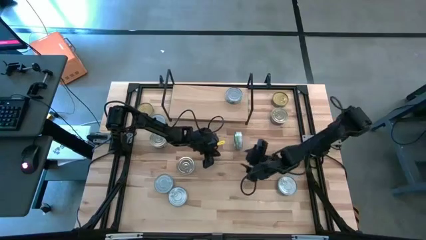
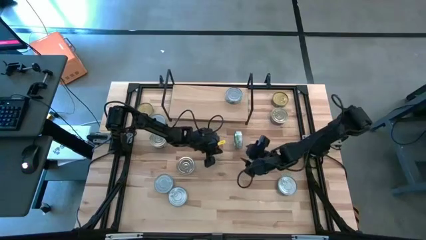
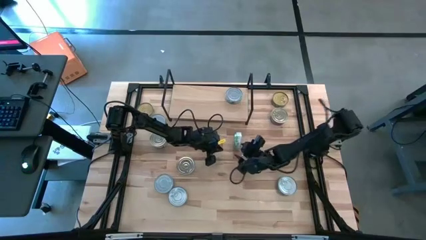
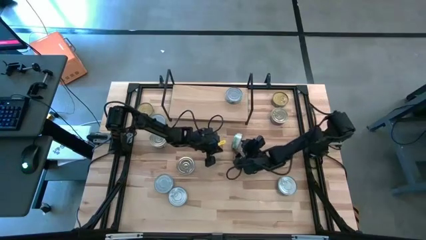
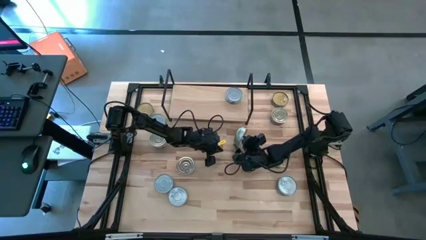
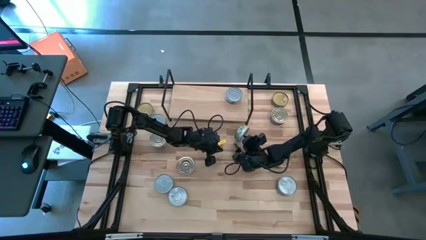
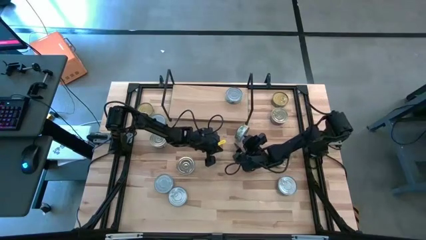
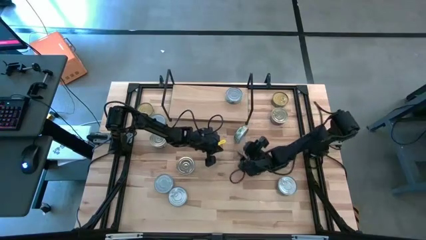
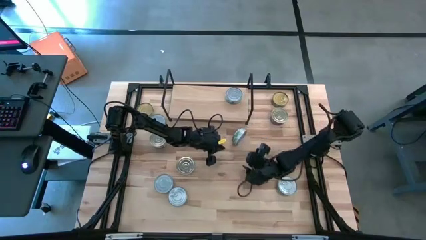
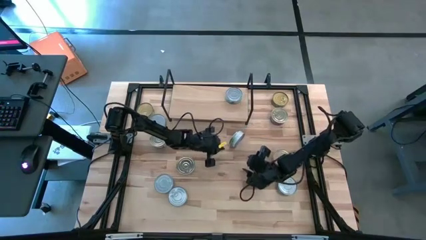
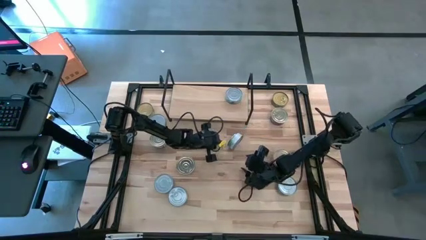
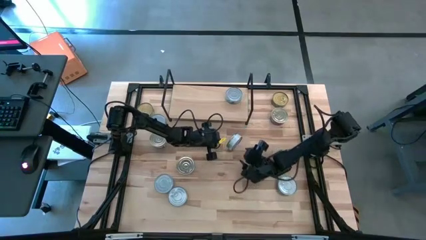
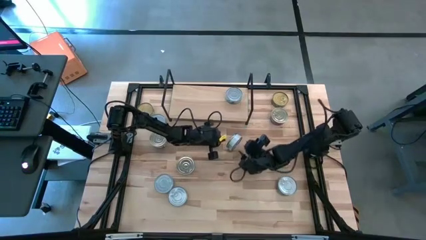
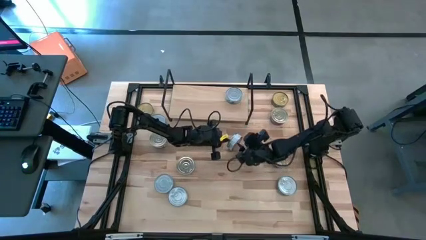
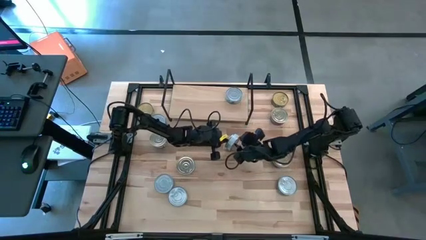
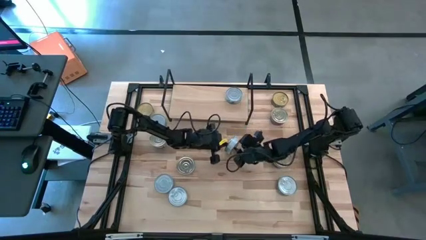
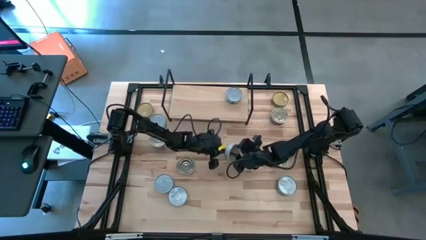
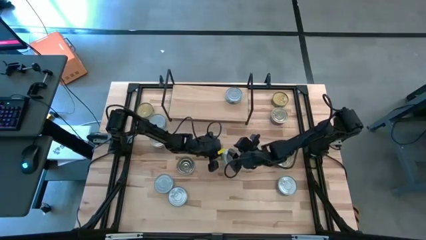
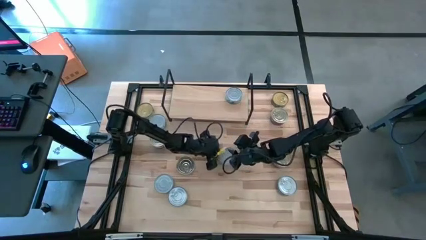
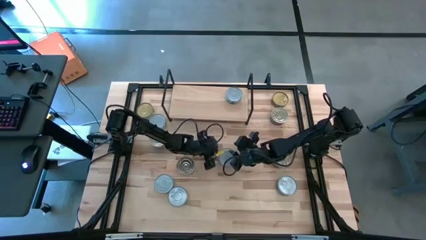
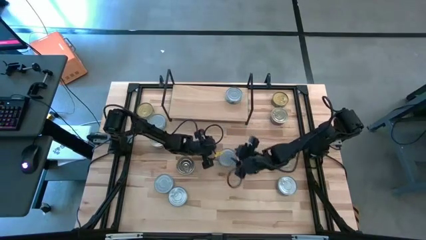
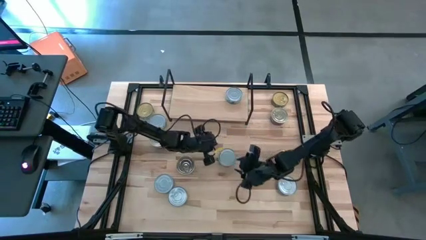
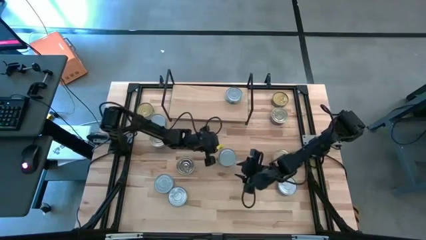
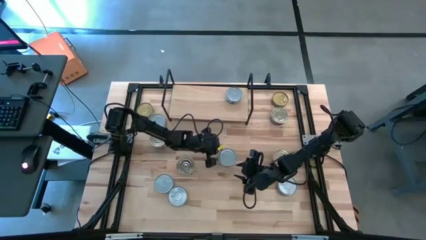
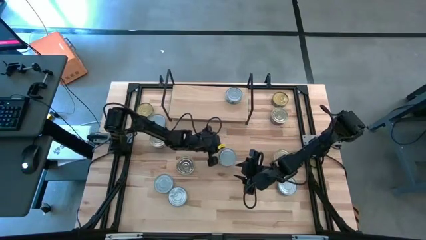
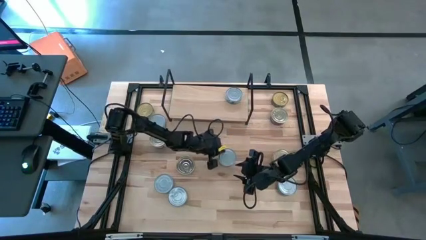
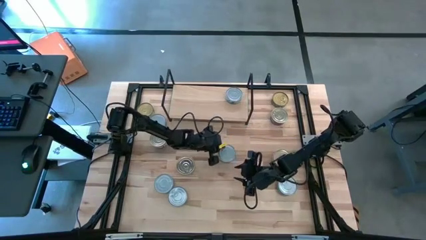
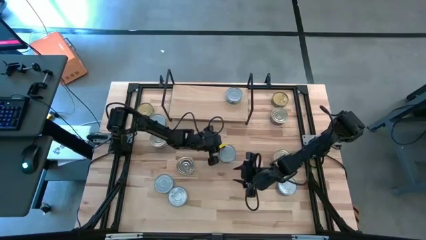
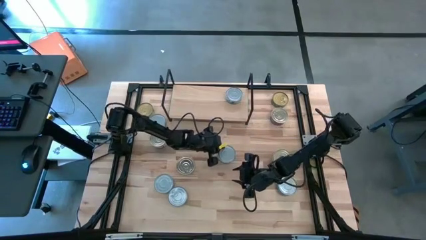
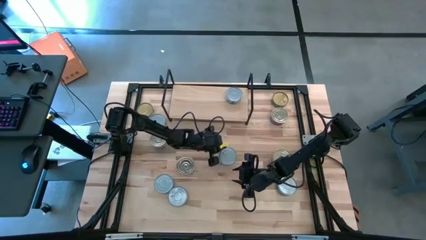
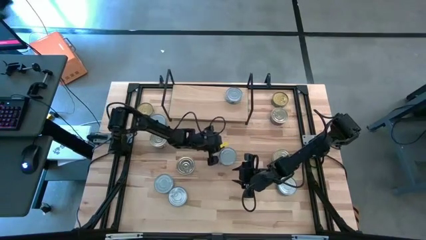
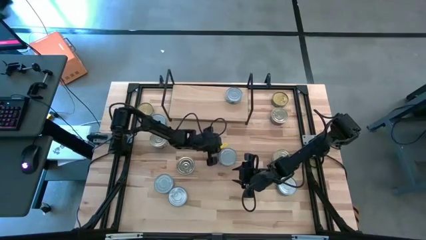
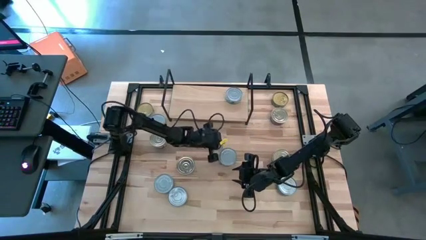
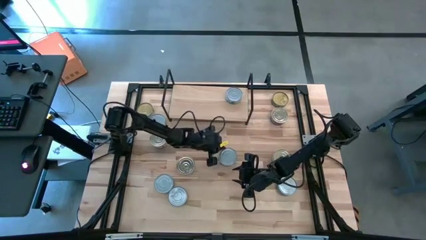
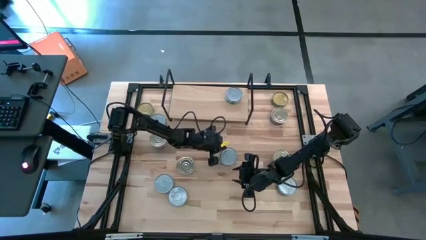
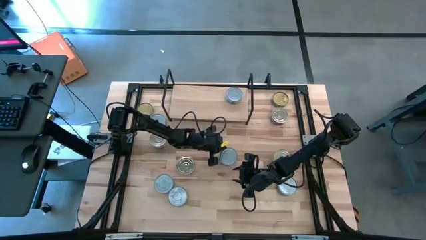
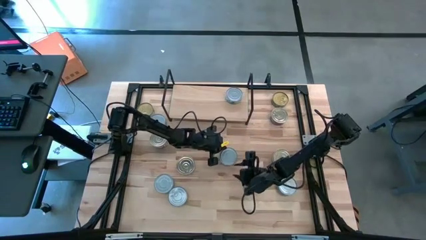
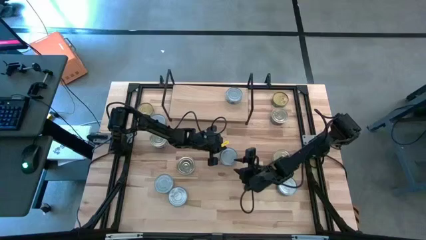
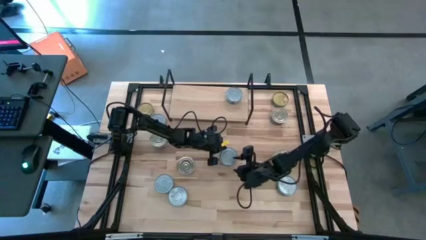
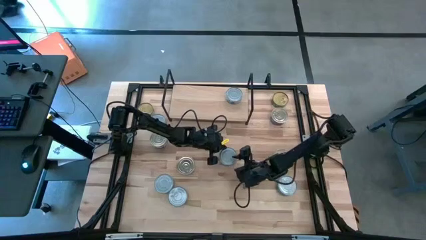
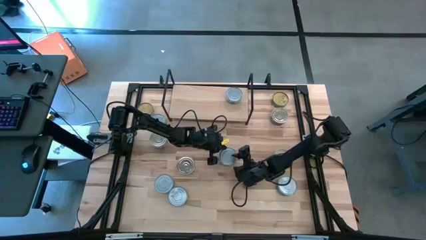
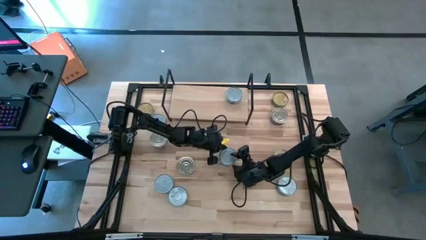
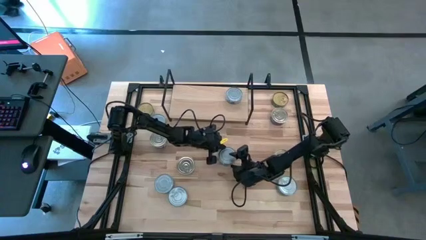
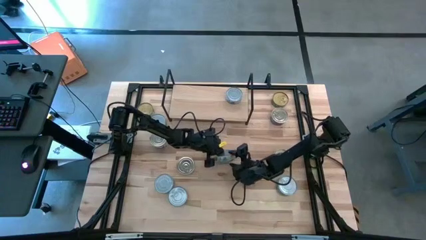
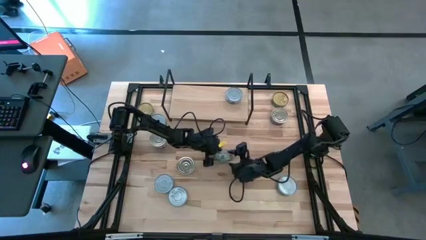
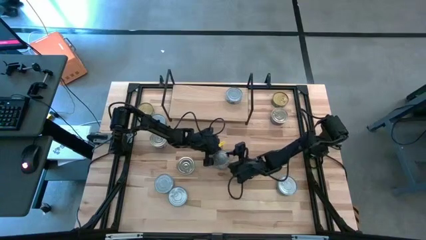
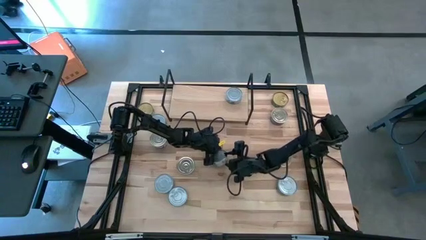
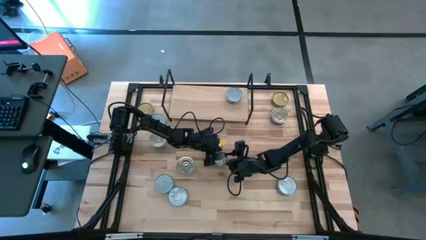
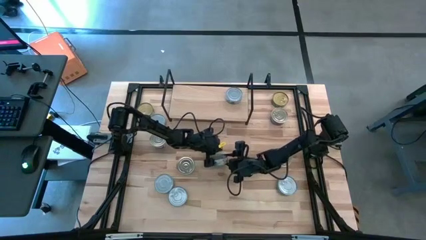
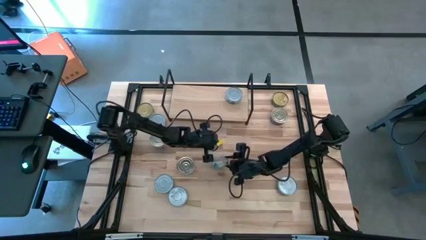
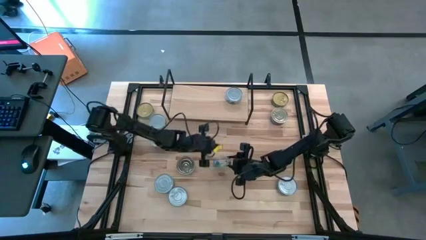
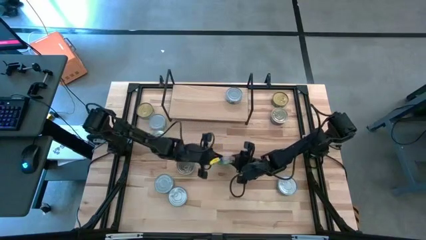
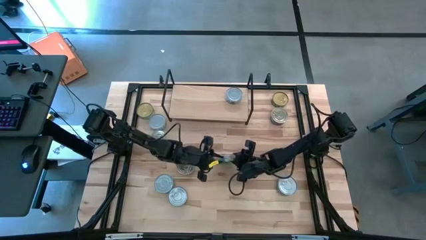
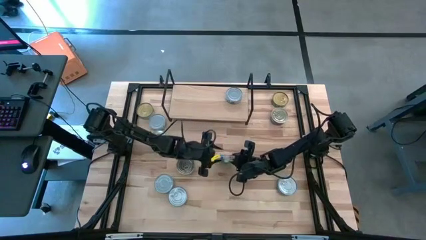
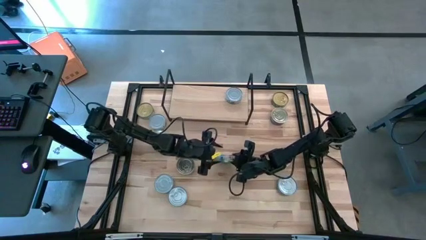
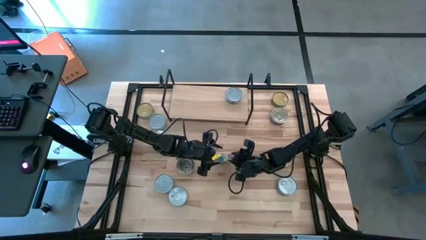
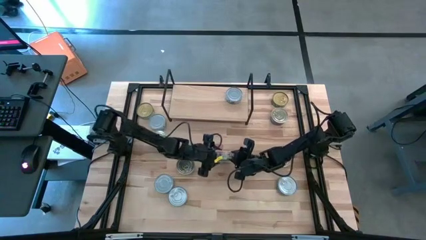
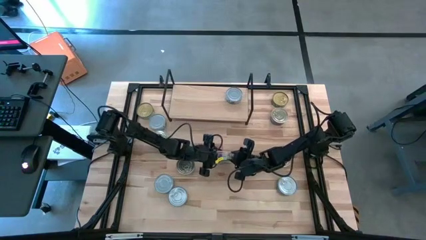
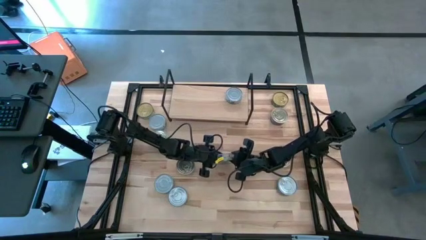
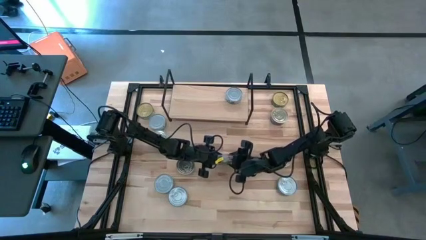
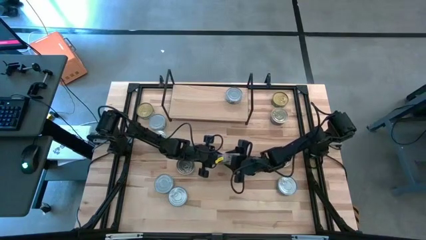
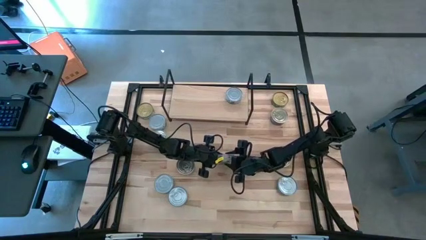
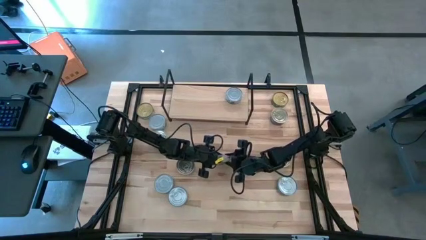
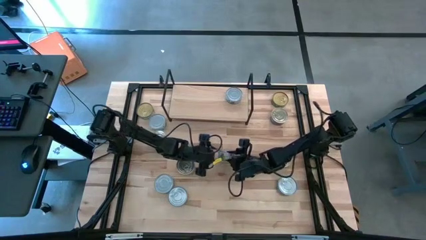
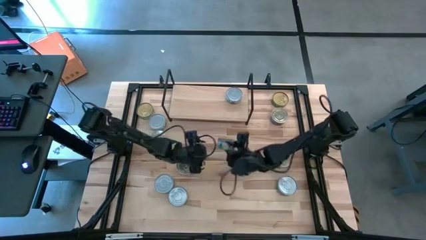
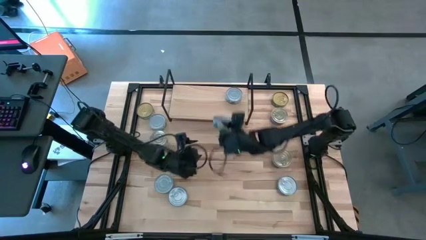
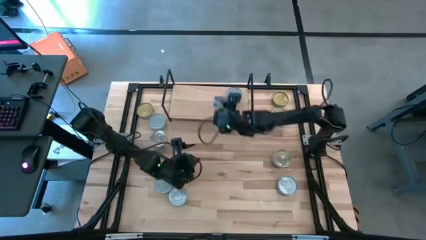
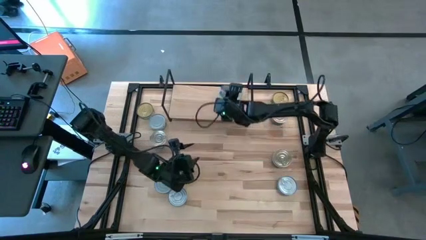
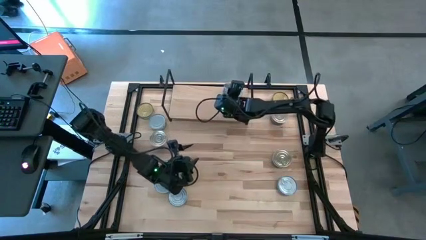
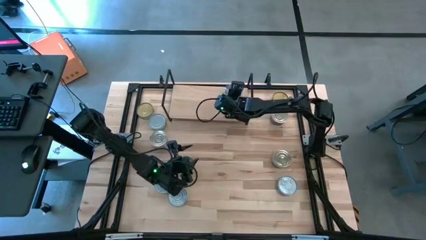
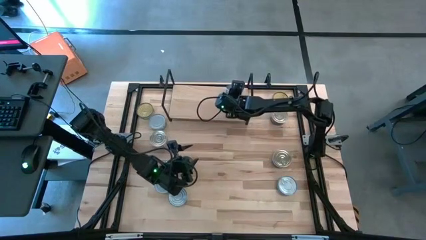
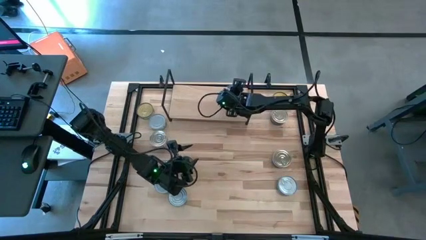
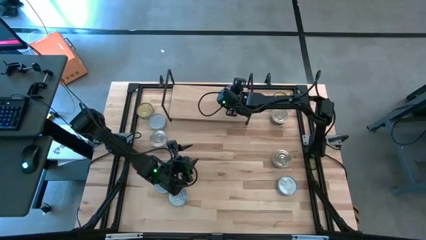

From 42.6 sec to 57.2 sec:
Task: Stack canned seafood by type on shelf
Stack the green-white tuna can on top of the green-white tuna can on the shelf

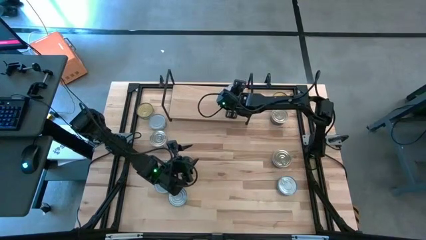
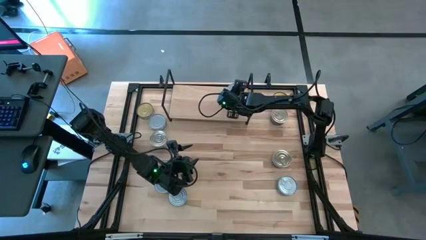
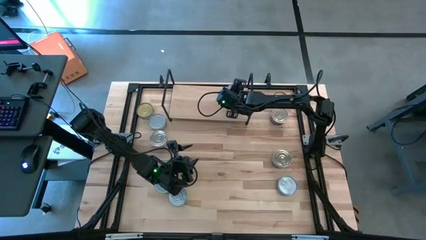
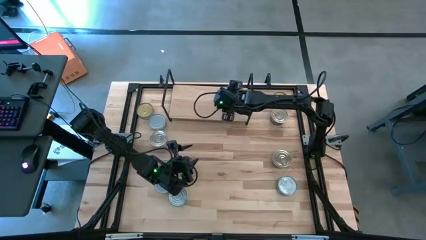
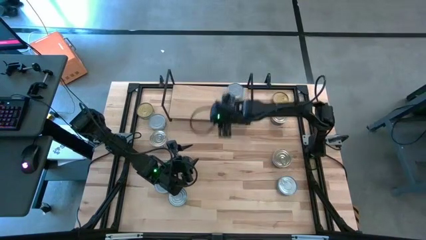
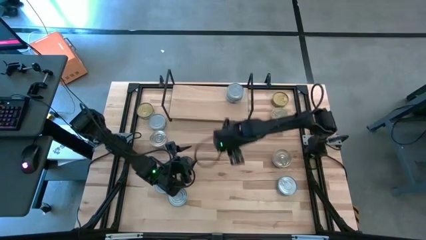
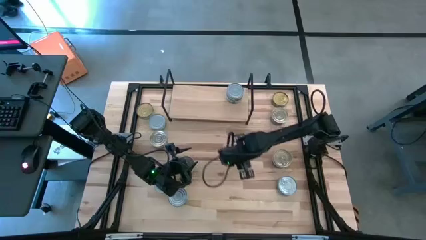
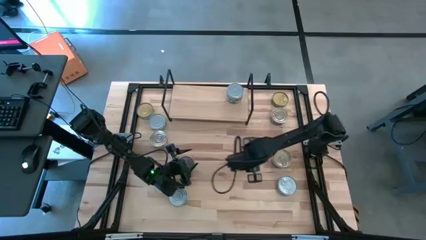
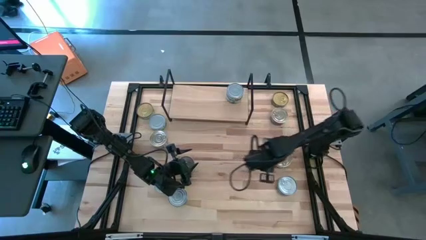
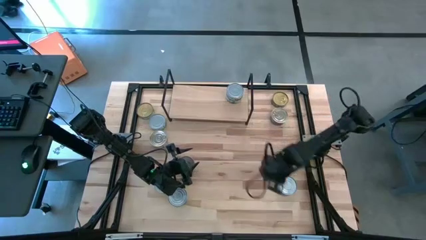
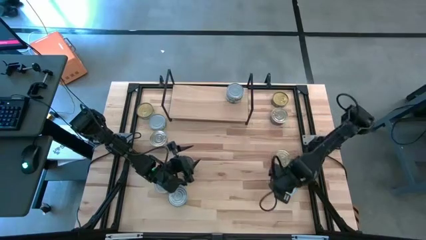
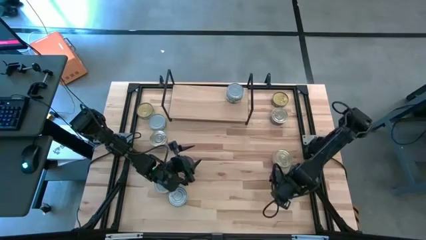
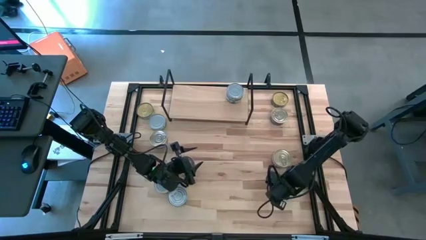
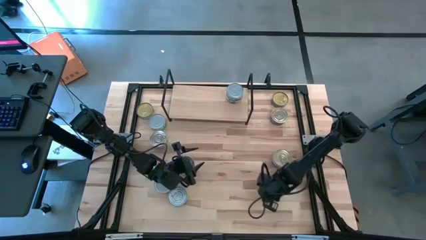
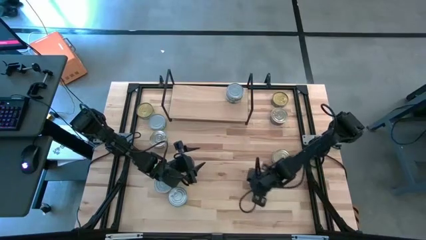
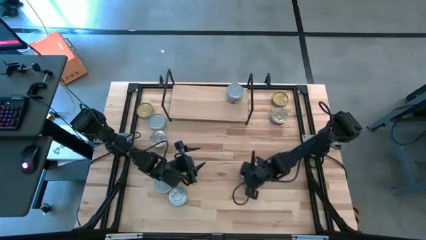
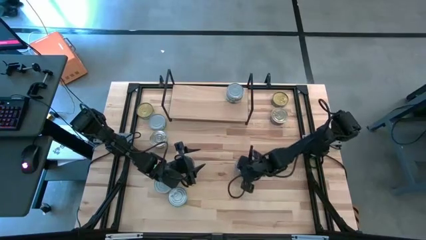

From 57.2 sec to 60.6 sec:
Move the green tuna can to the center of the table
